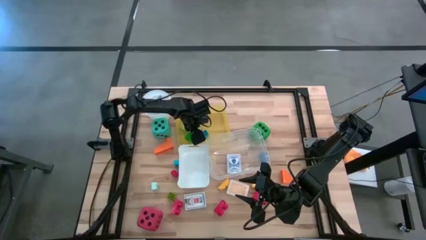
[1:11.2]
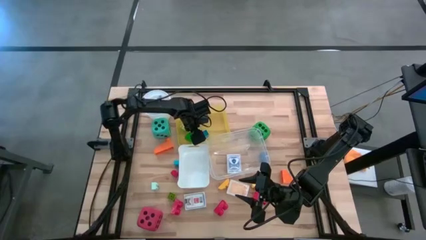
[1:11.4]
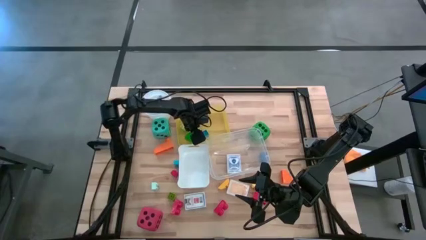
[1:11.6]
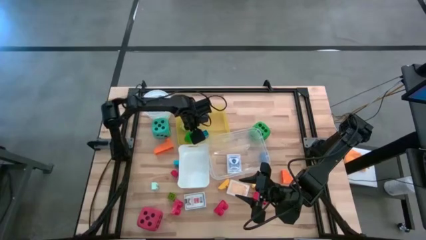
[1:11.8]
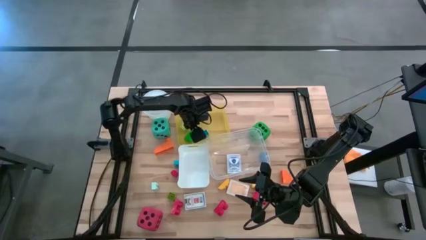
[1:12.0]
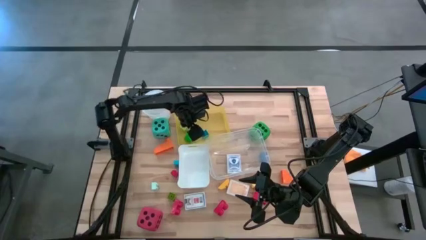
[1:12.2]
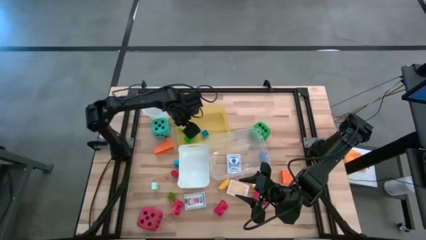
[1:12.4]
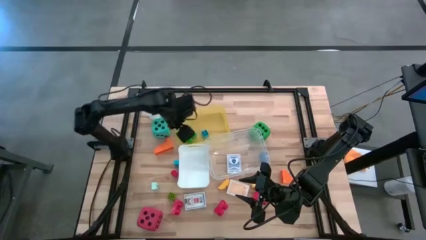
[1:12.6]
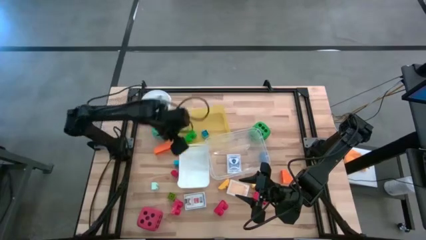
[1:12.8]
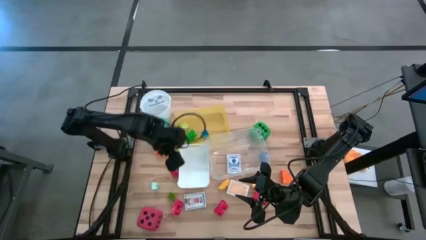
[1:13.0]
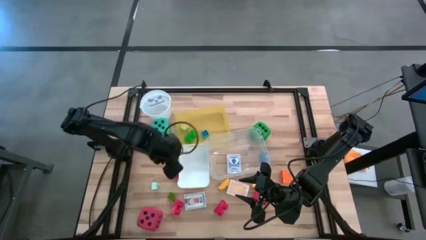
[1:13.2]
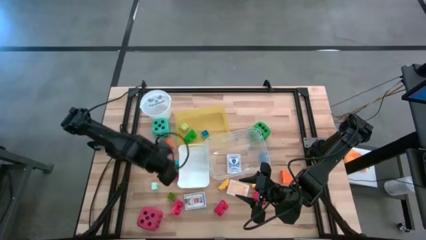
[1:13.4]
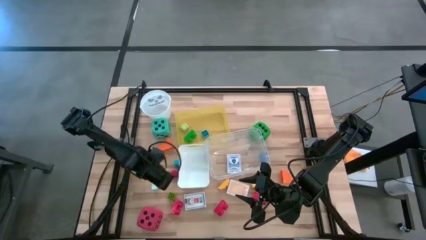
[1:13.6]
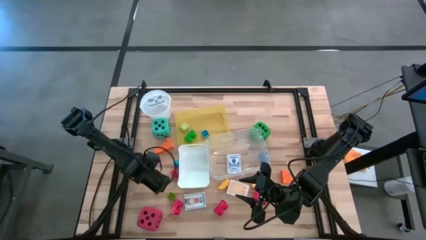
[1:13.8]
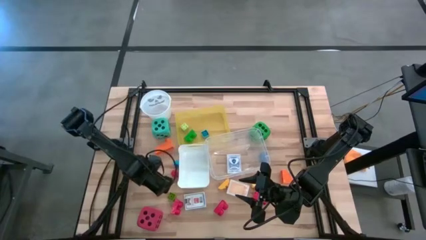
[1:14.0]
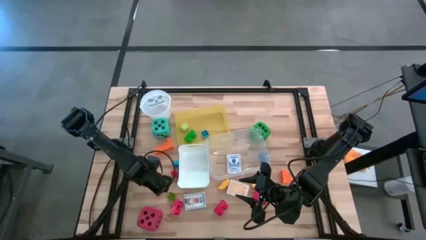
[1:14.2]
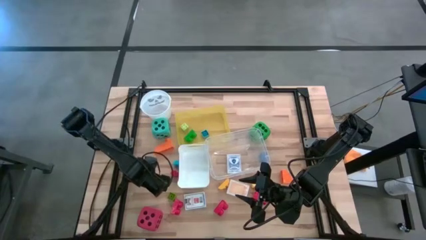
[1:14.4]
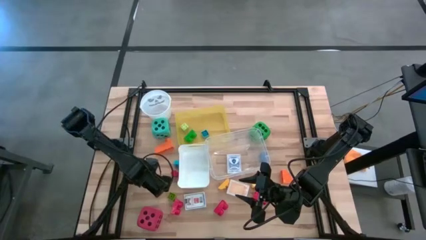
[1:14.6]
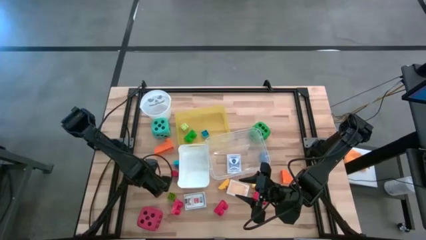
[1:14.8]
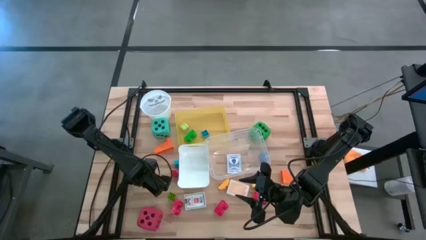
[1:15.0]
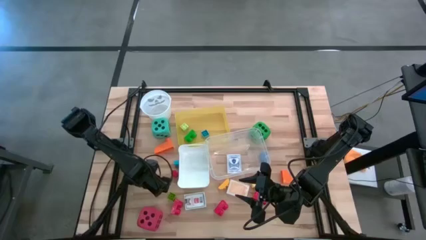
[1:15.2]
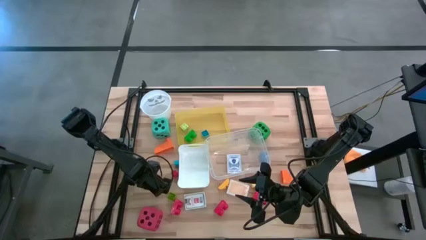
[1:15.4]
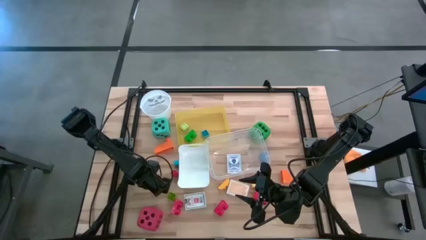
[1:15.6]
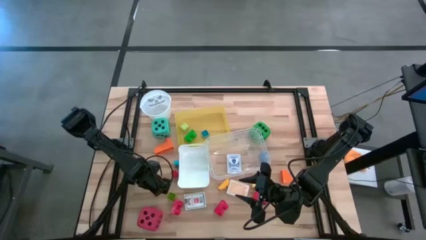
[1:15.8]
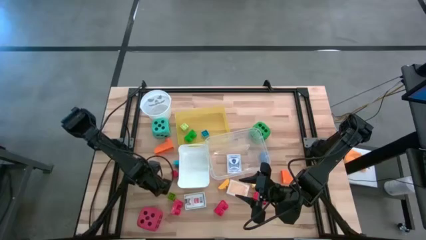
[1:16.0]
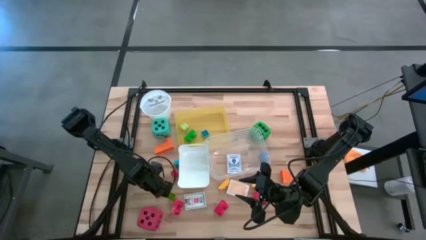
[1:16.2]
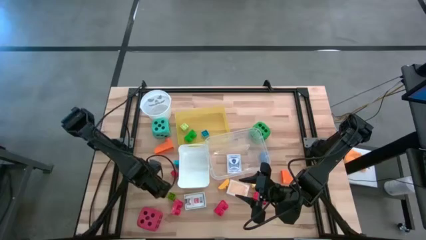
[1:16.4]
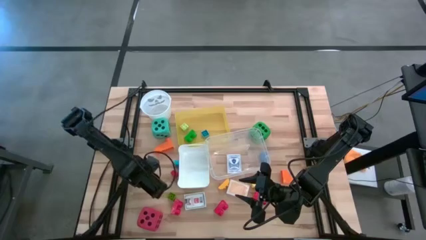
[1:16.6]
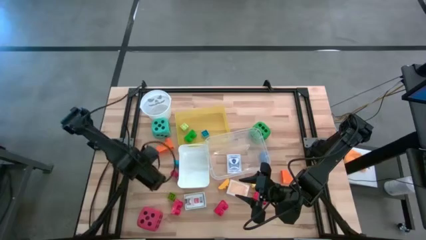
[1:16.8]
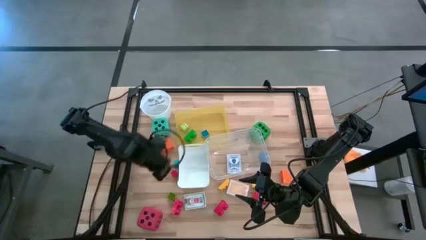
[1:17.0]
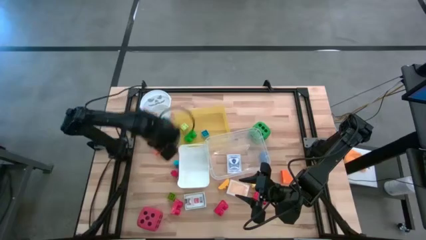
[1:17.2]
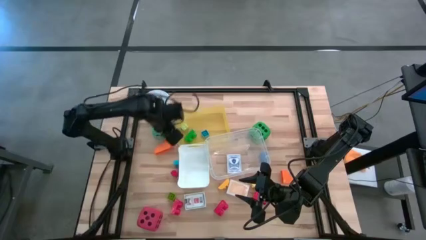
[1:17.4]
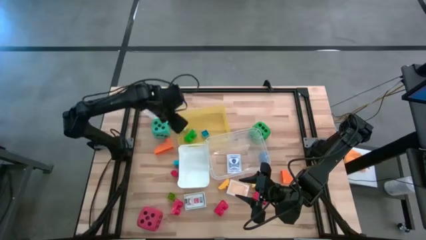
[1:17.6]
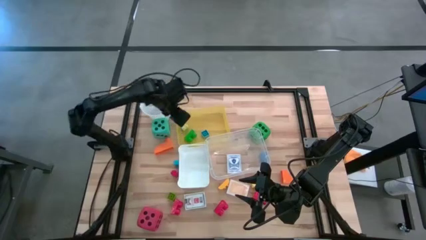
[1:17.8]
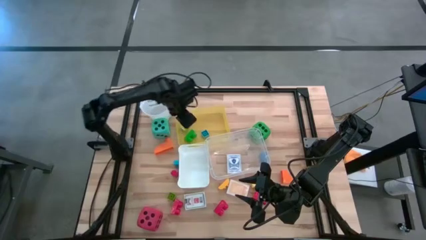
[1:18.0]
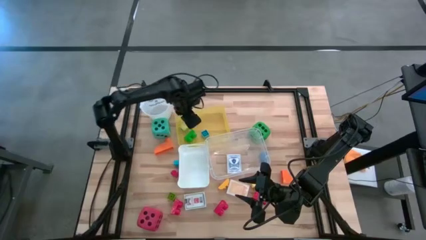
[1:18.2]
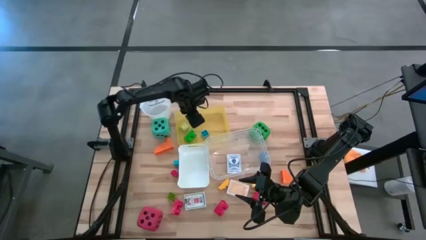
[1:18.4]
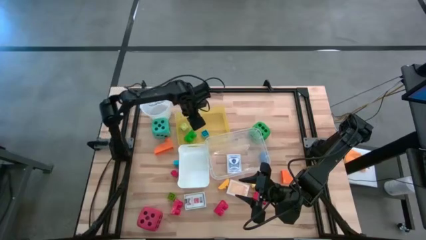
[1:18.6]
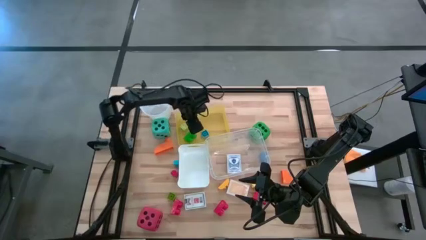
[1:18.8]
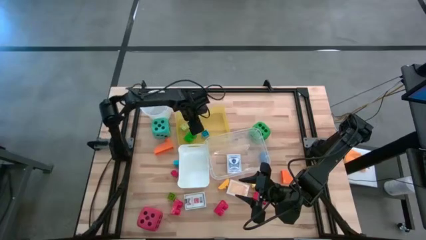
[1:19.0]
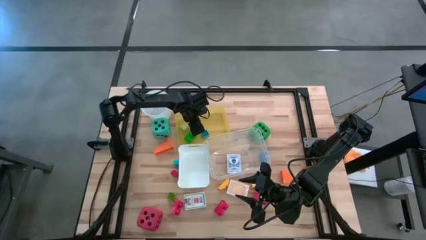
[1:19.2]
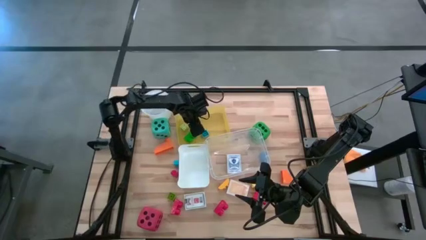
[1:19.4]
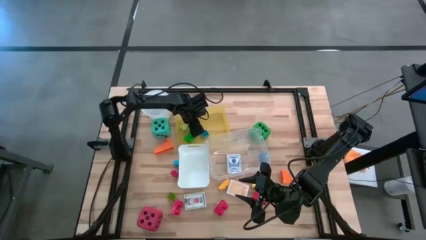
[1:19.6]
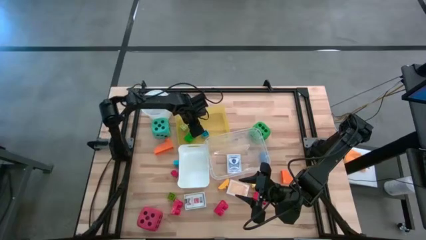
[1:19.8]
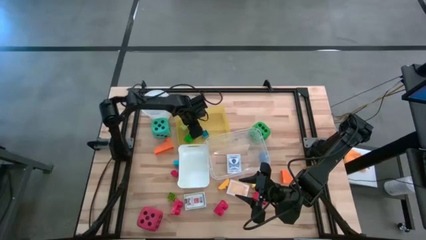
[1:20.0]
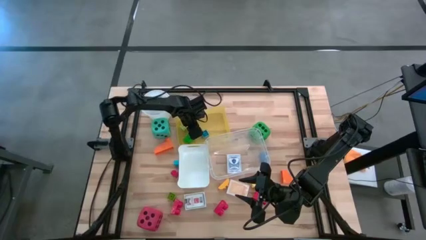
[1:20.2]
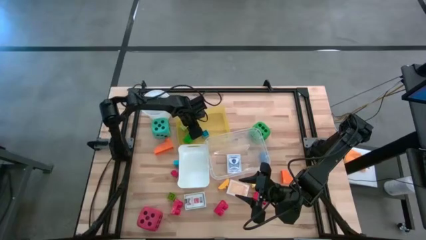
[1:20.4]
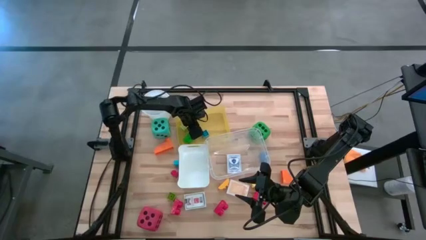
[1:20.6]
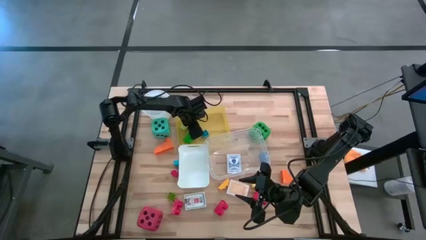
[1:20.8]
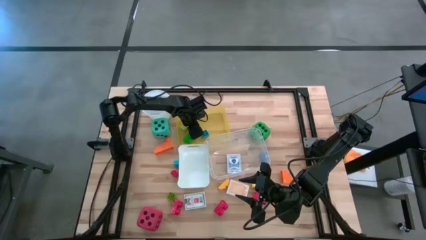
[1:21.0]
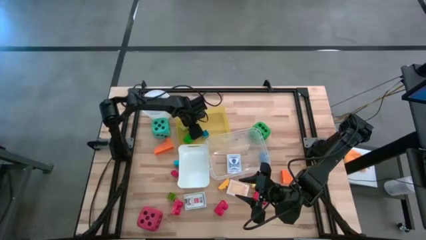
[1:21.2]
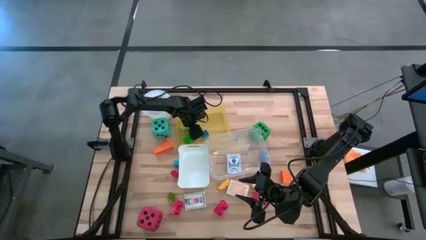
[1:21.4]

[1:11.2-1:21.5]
Task: Pick & Place Toys
Put the light blue game piece into the yellow bin

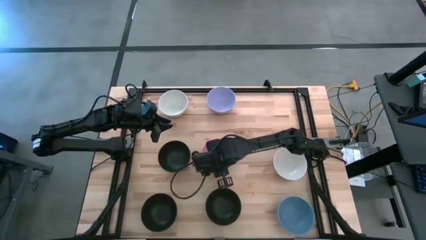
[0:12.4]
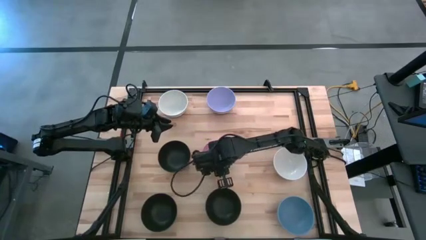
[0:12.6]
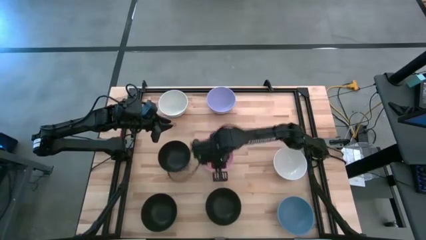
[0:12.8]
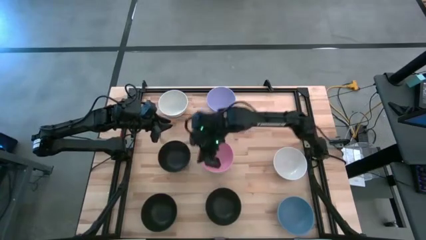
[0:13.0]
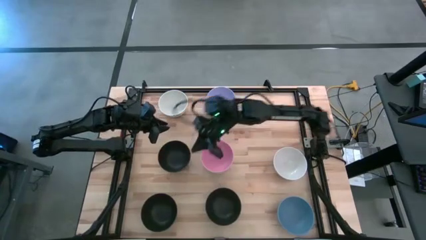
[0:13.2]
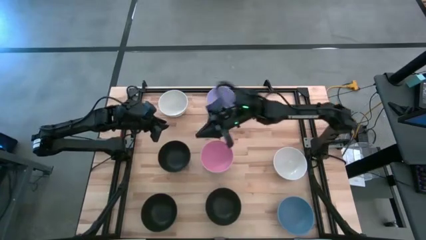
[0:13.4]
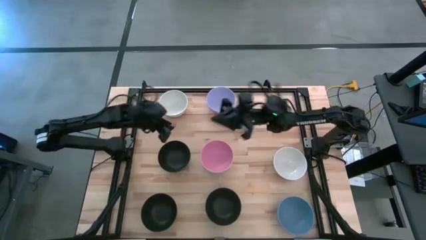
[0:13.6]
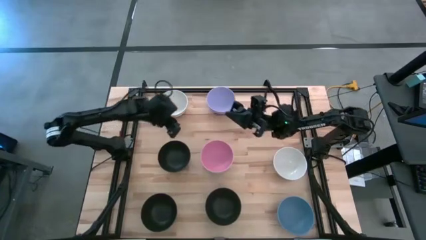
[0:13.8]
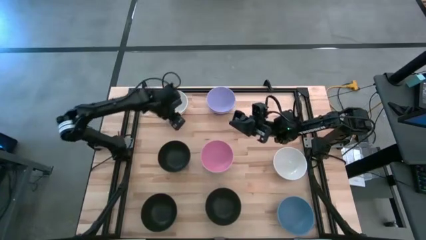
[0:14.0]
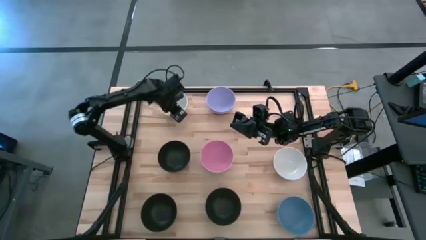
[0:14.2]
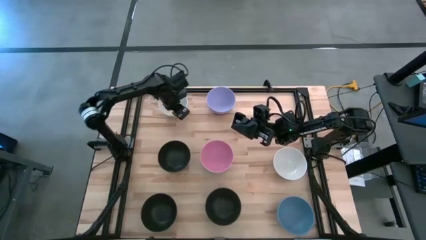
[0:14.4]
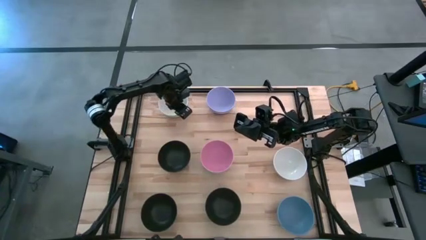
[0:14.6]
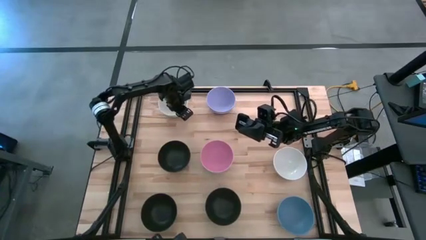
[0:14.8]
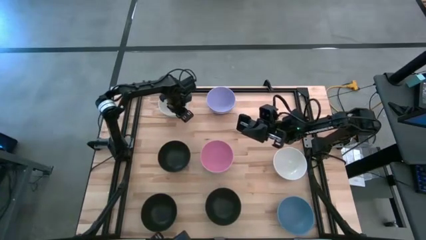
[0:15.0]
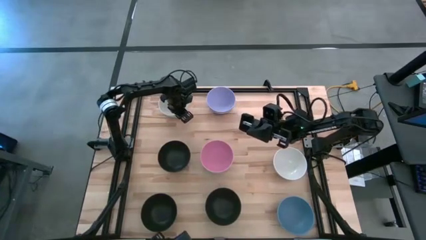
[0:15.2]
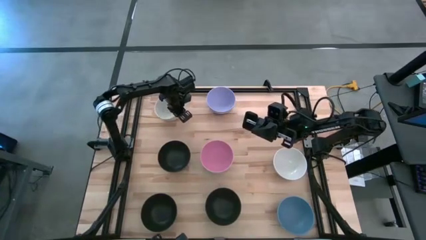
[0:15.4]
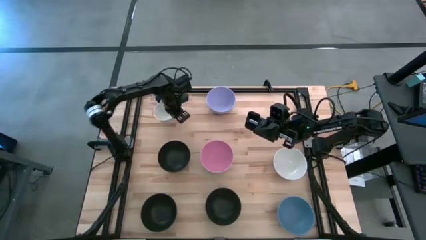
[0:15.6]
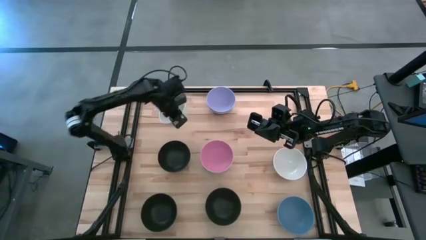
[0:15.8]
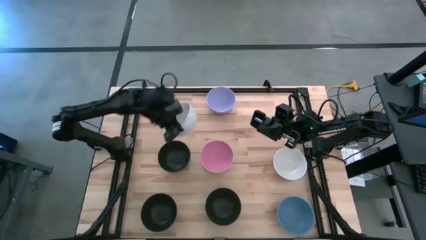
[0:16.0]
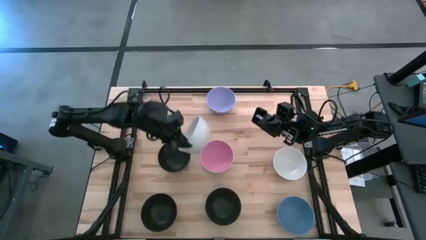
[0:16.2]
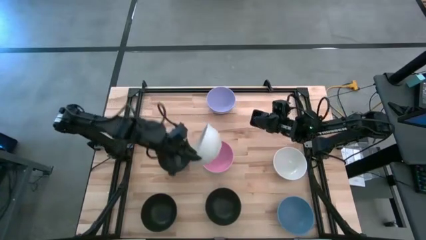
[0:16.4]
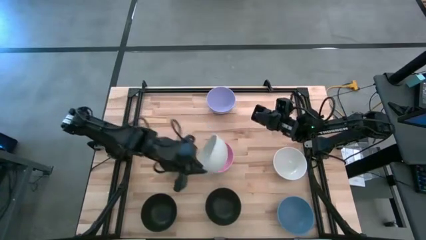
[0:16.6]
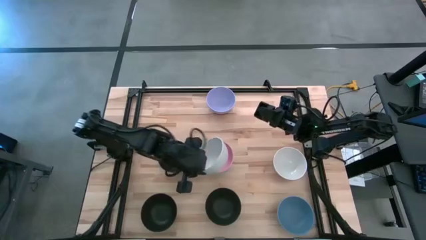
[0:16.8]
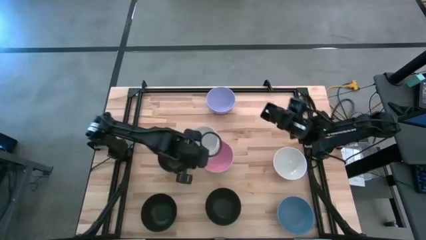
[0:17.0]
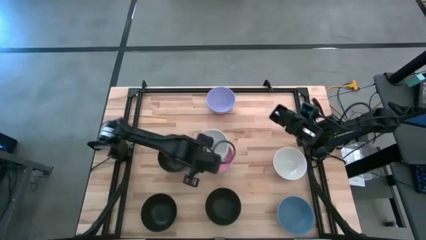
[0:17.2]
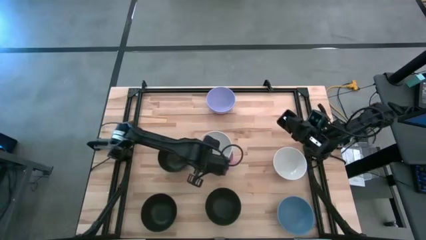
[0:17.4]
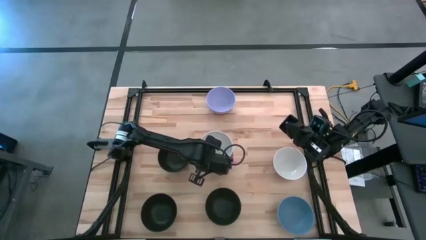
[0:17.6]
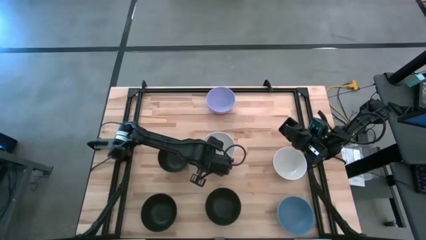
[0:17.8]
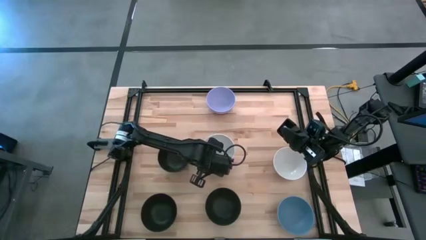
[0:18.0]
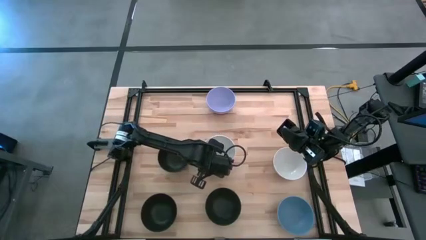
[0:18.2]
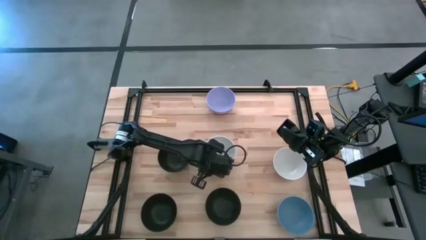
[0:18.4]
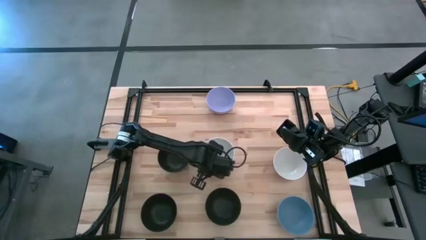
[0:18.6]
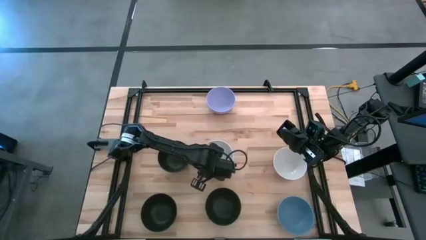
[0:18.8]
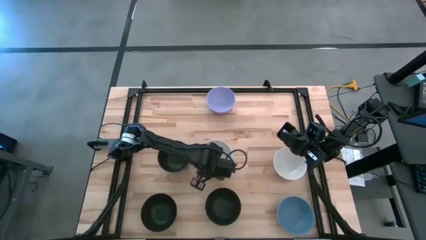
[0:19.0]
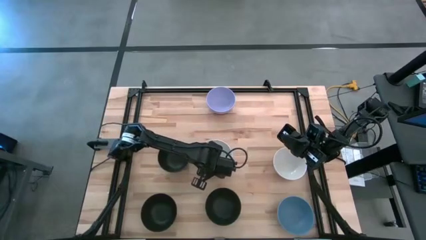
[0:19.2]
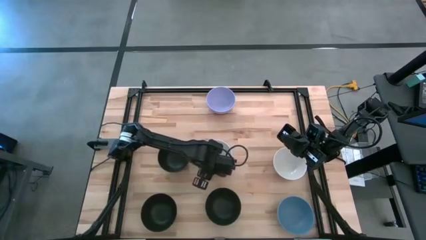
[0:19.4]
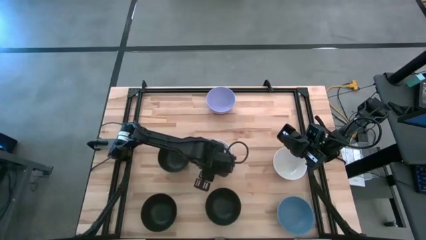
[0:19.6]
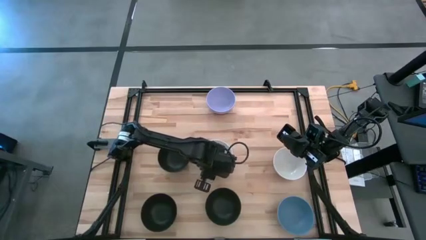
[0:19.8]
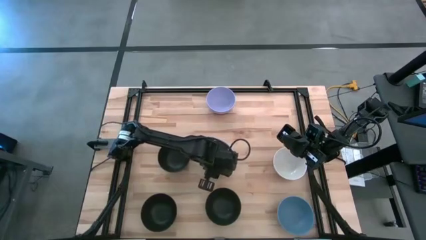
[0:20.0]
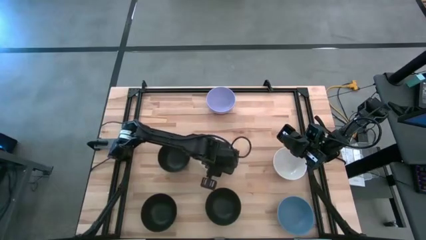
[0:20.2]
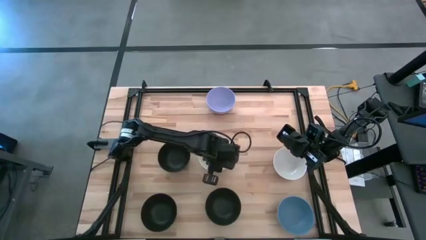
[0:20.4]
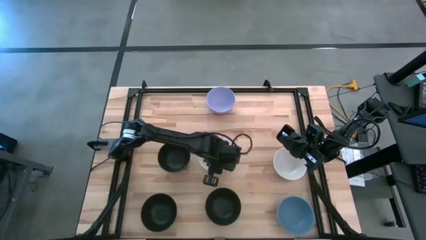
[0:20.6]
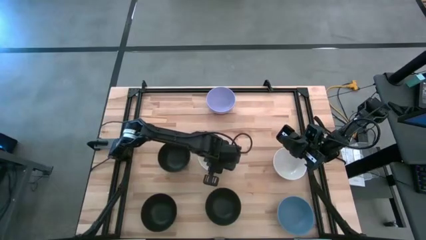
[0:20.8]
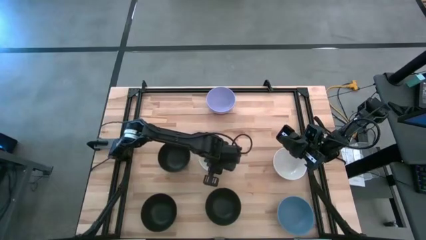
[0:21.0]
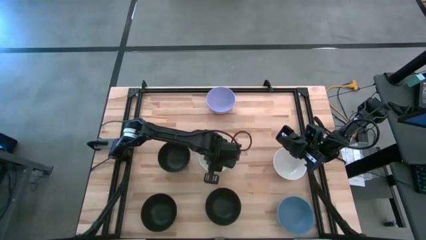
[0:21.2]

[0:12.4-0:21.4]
Task: Nest bowls inside each other
Stack the top white bowl on top of the pink bowl
